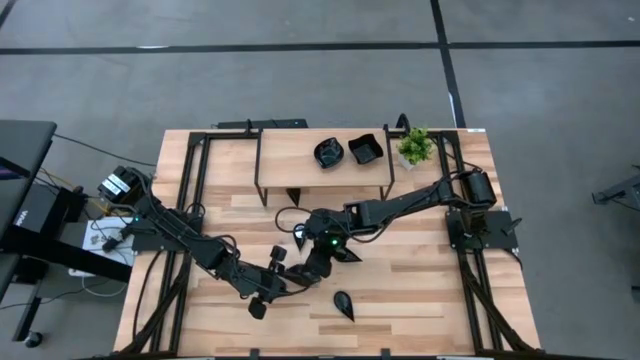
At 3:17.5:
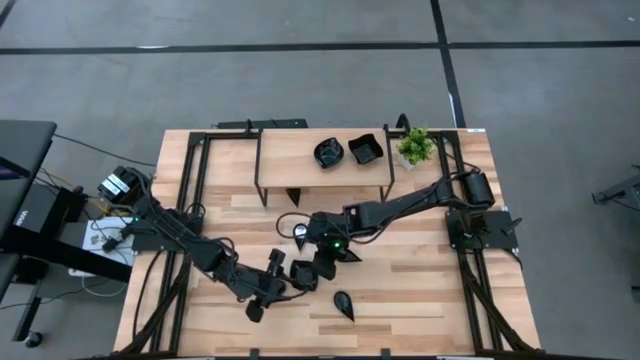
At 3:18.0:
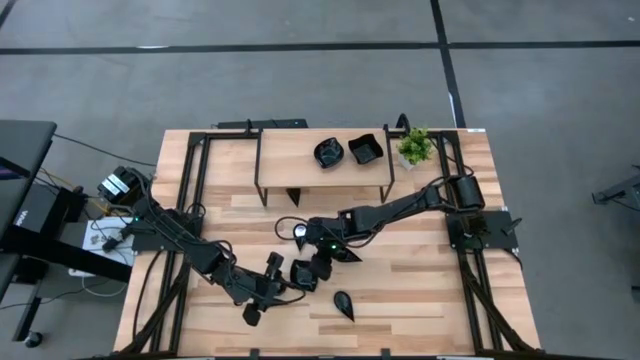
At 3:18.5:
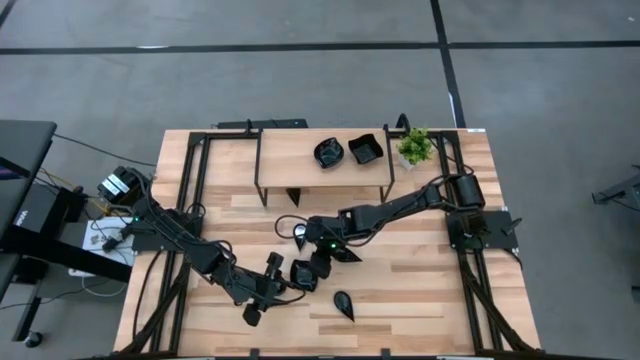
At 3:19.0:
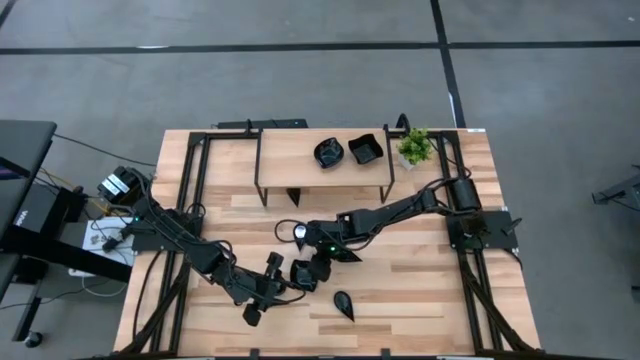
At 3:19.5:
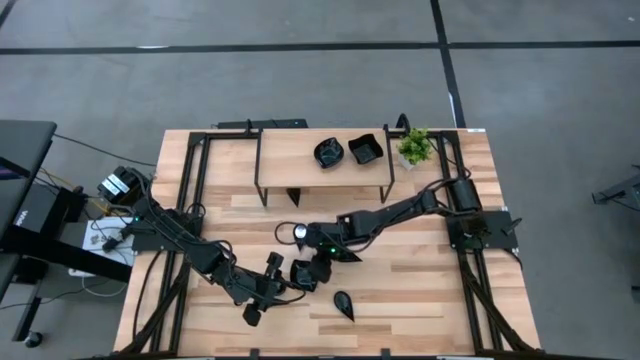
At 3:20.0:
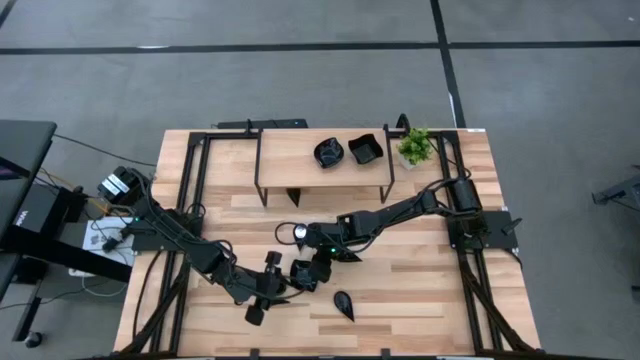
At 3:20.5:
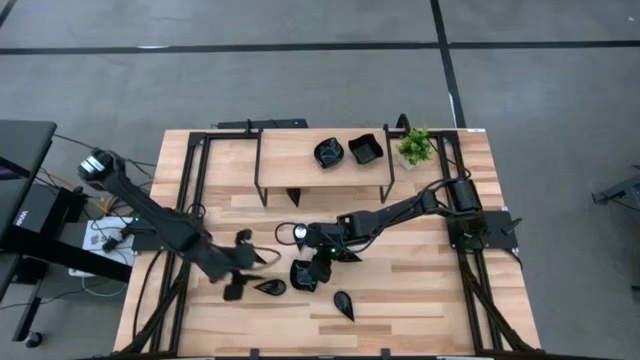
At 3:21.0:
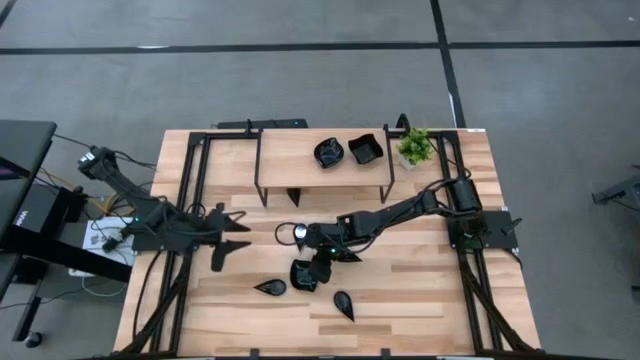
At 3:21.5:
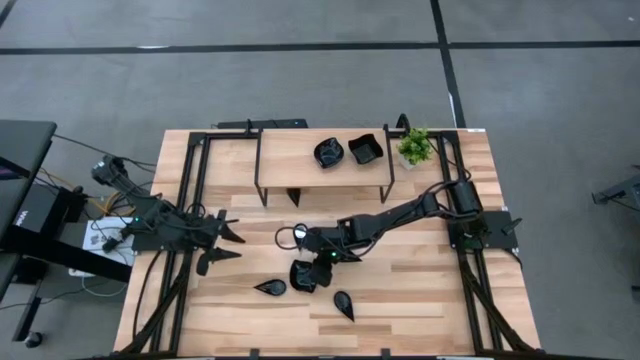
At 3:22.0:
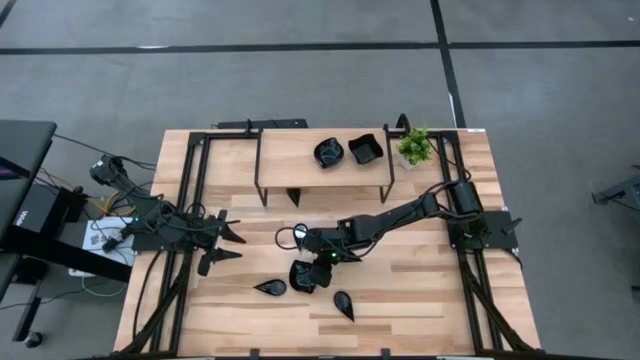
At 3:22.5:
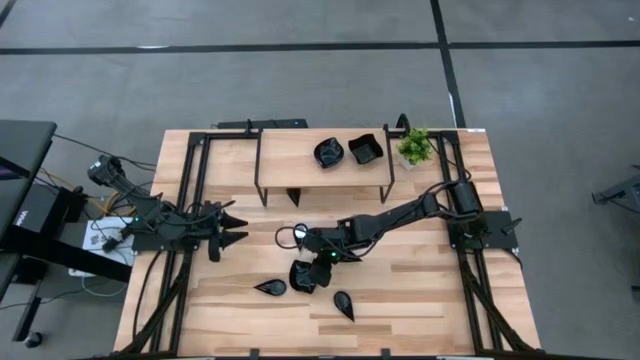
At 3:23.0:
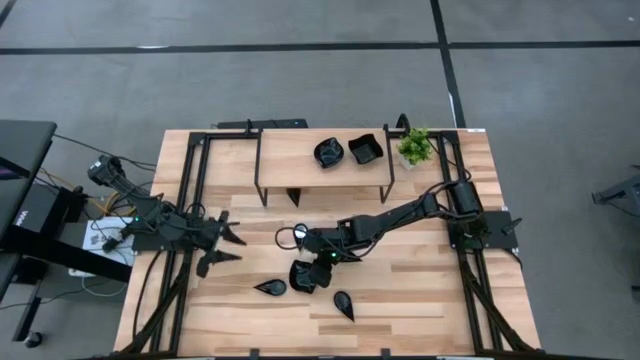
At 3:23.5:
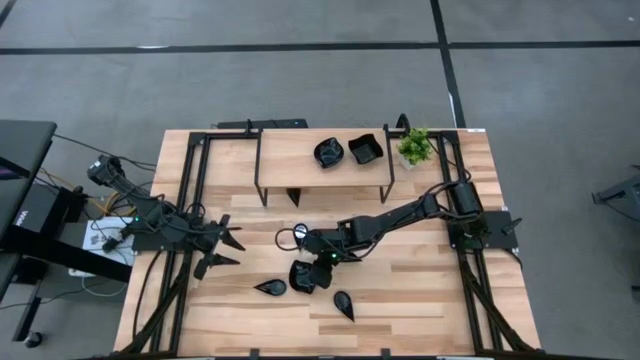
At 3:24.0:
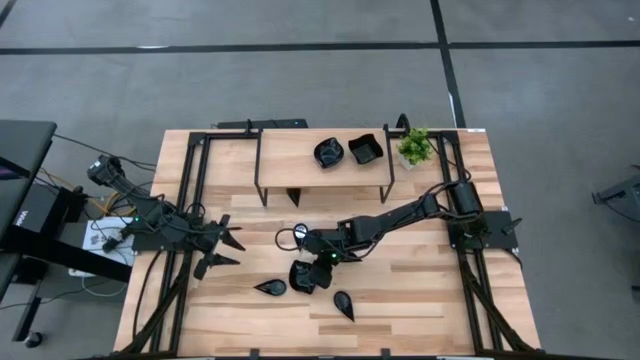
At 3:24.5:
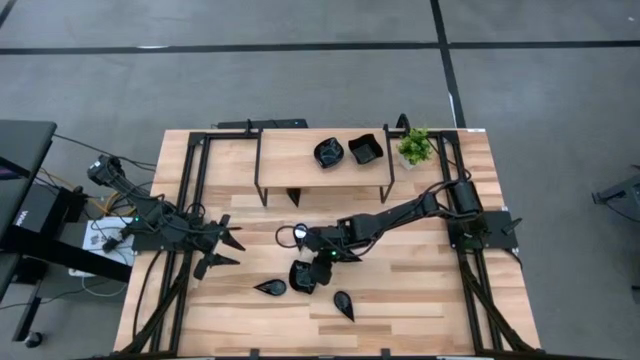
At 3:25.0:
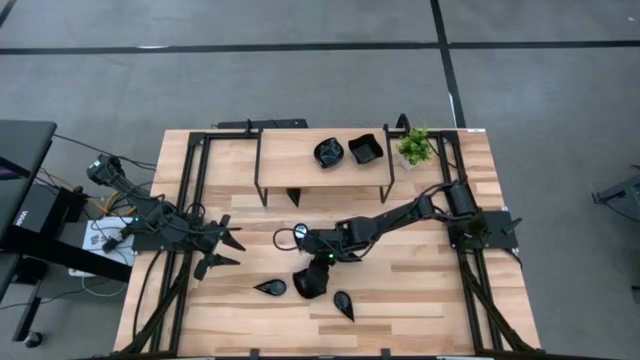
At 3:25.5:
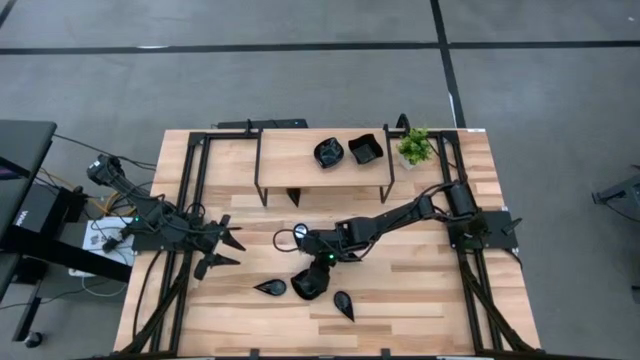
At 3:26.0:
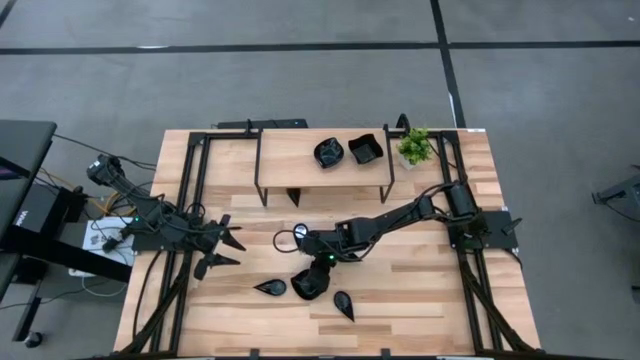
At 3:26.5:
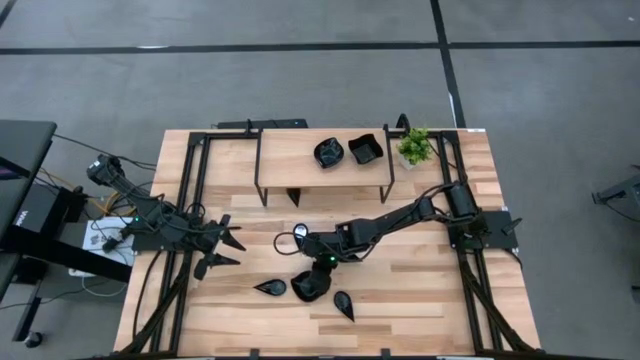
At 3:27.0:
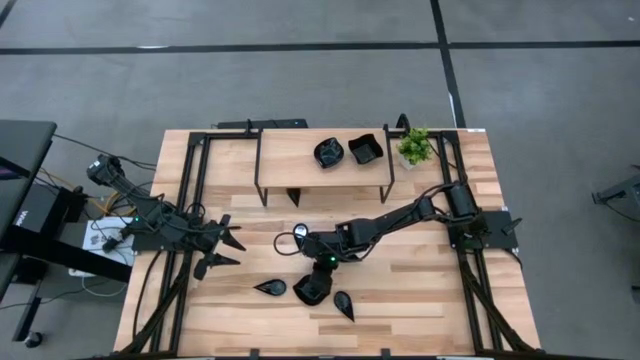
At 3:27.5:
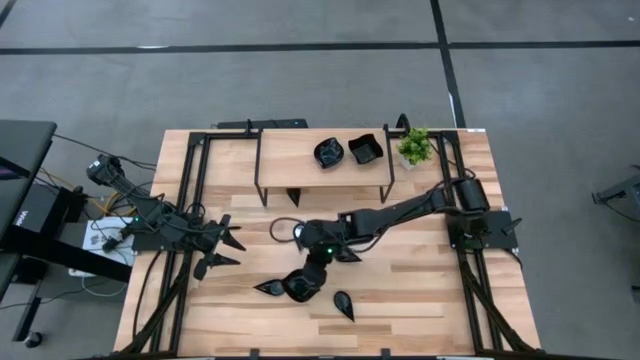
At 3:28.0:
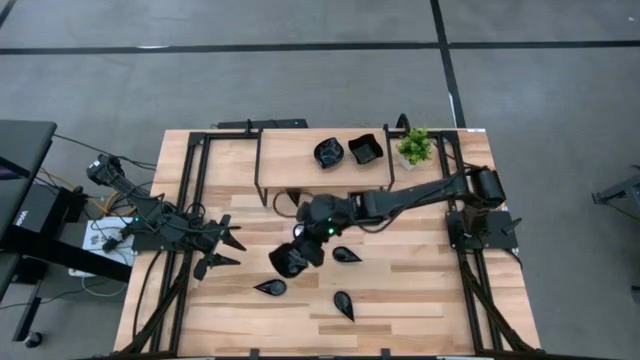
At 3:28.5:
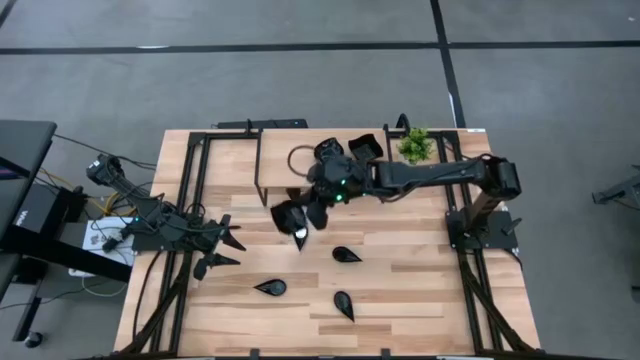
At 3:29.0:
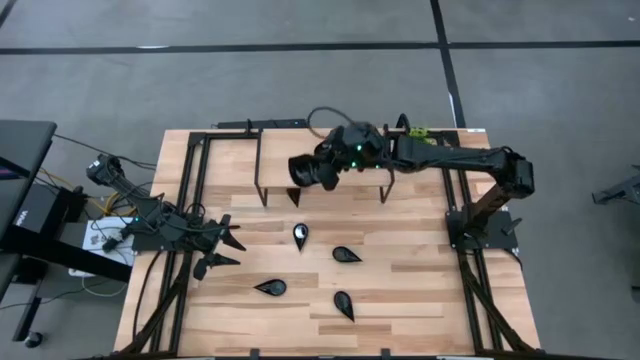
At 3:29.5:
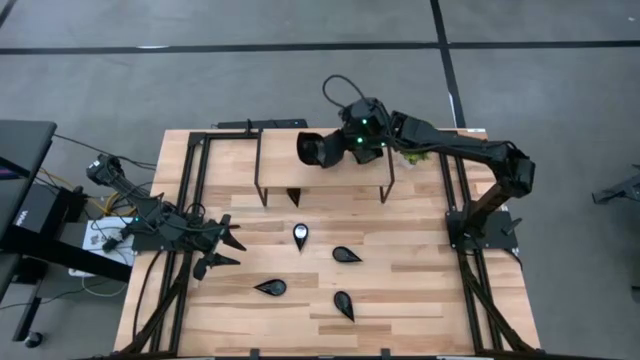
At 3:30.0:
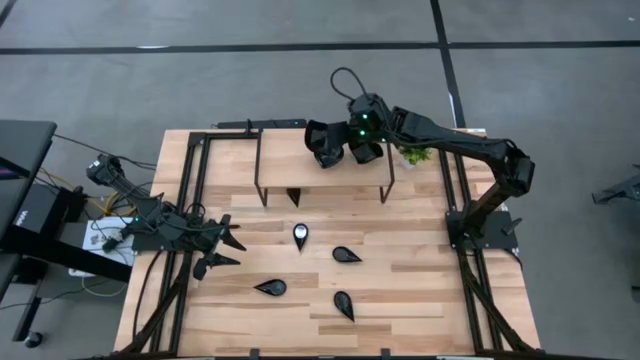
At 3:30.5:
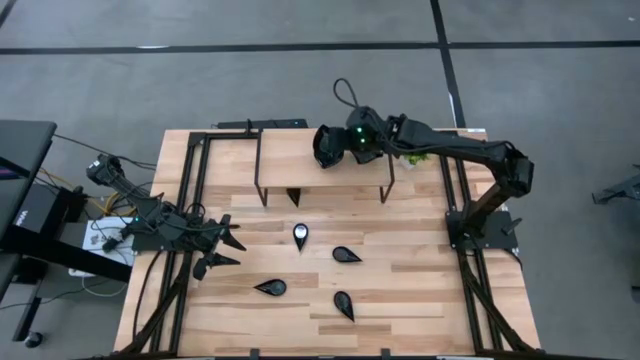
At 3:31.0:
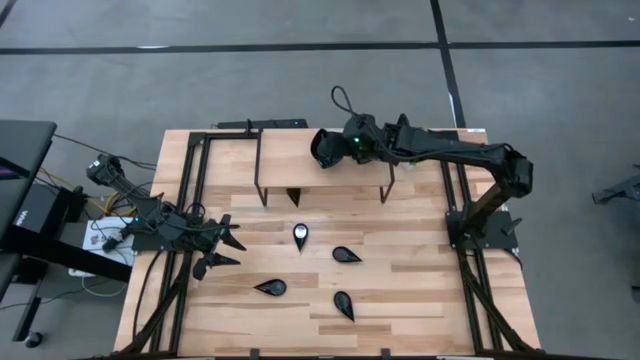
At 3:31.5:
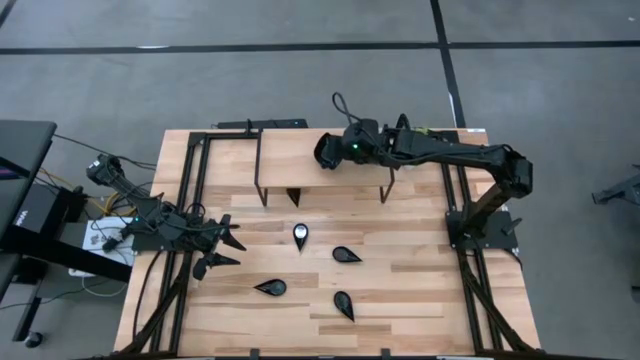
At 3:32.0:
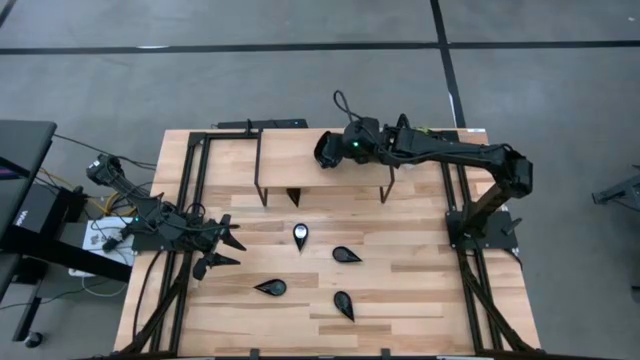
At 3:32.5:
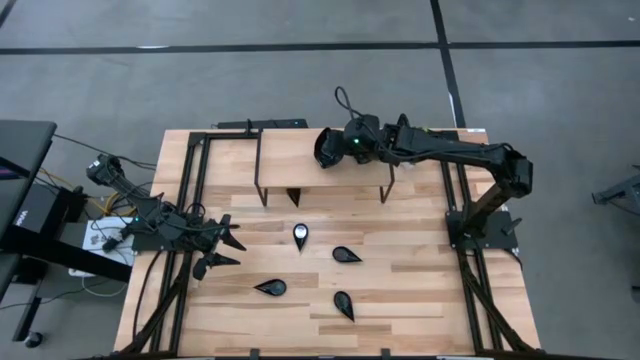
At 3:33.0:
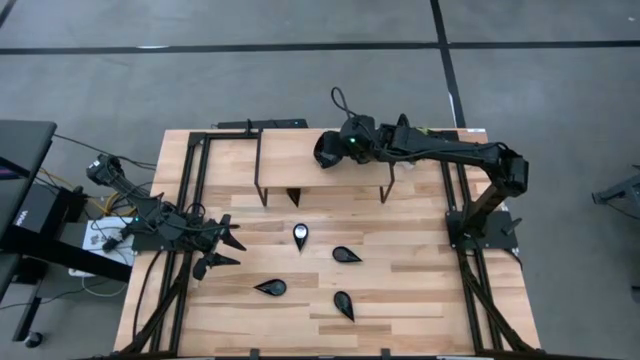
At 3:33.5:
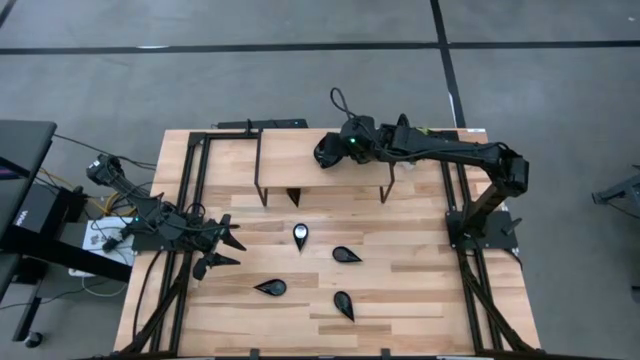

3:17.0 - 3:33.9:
Task: Pick & Place Mini shaped plates
Stack the black leaf shaped plate on the black leaf shaped plate on the shelf

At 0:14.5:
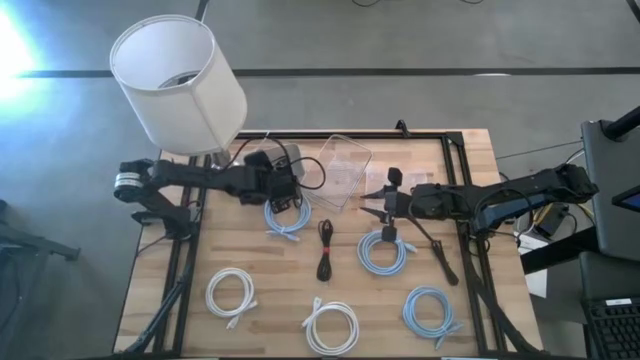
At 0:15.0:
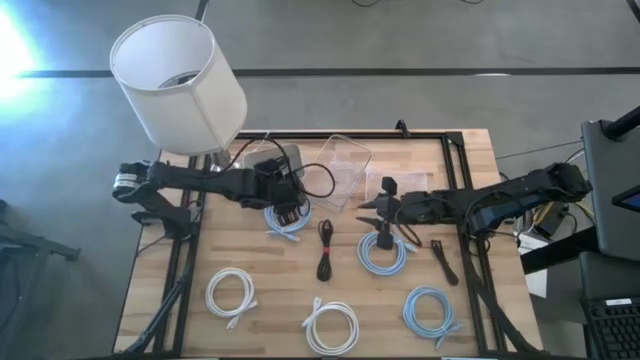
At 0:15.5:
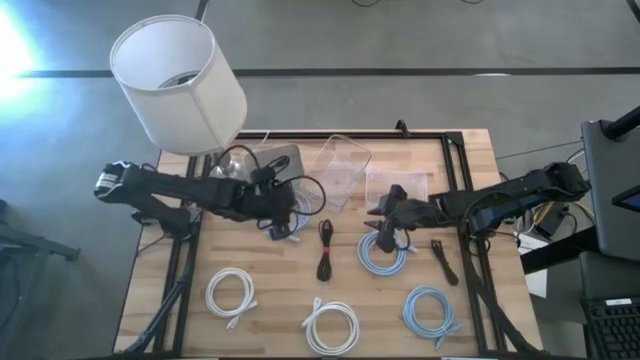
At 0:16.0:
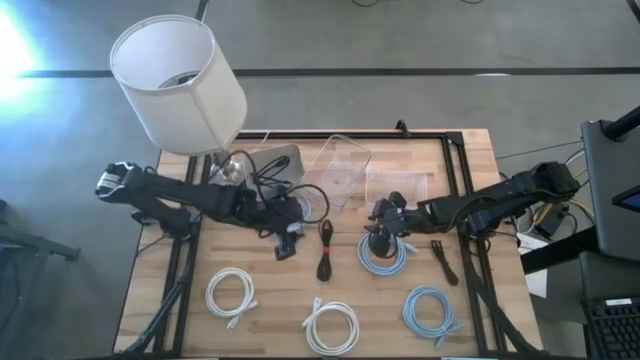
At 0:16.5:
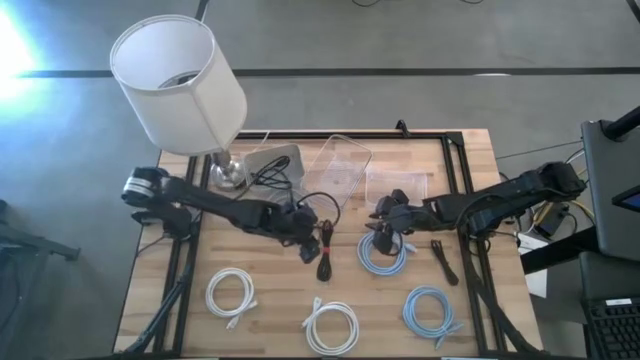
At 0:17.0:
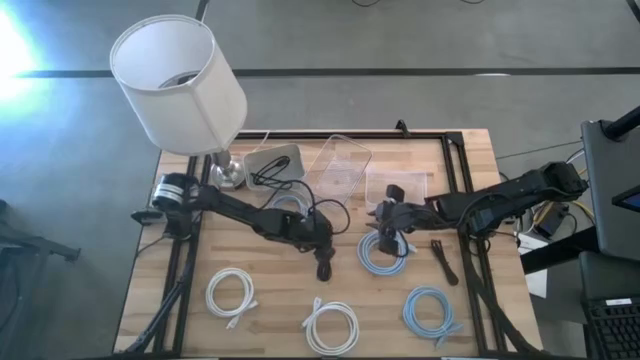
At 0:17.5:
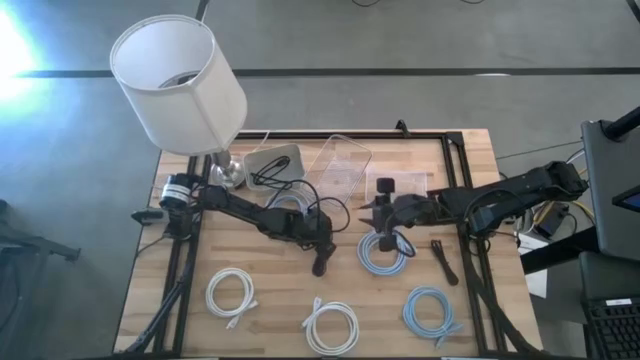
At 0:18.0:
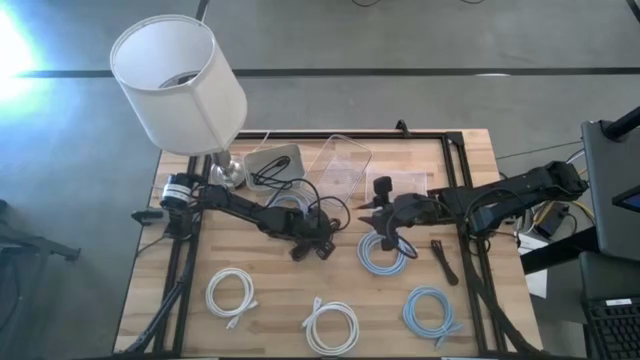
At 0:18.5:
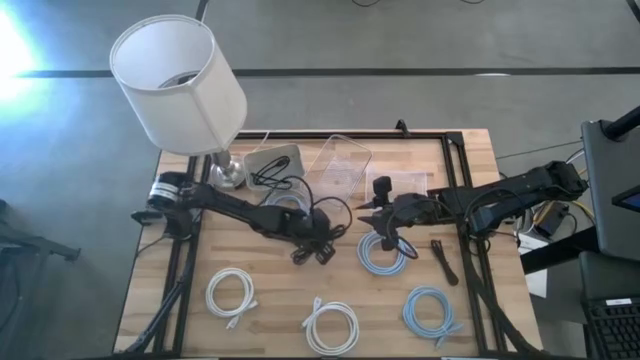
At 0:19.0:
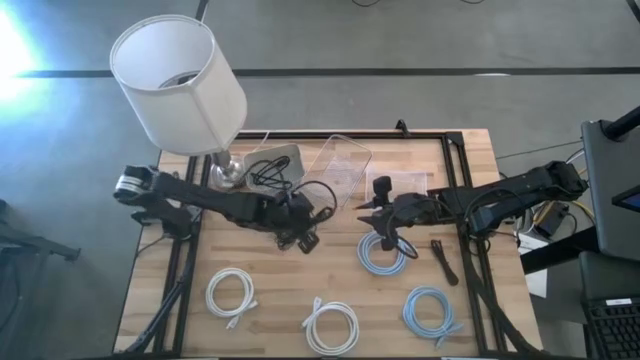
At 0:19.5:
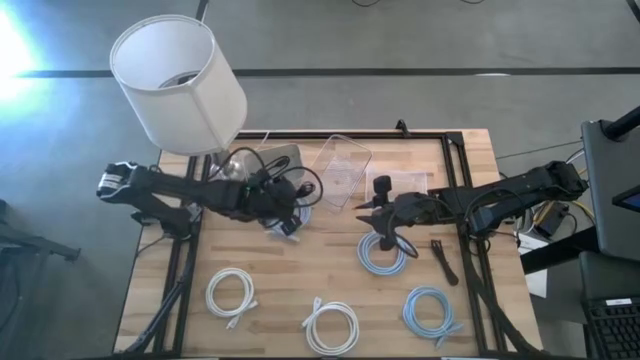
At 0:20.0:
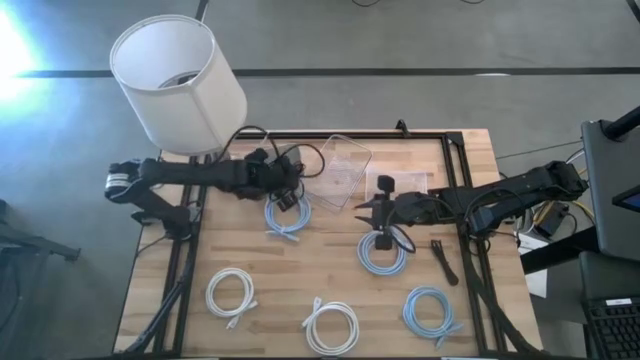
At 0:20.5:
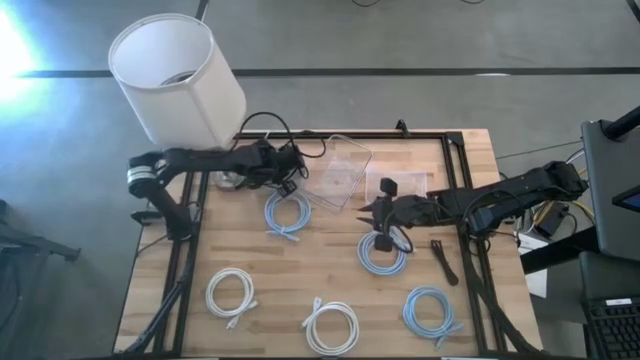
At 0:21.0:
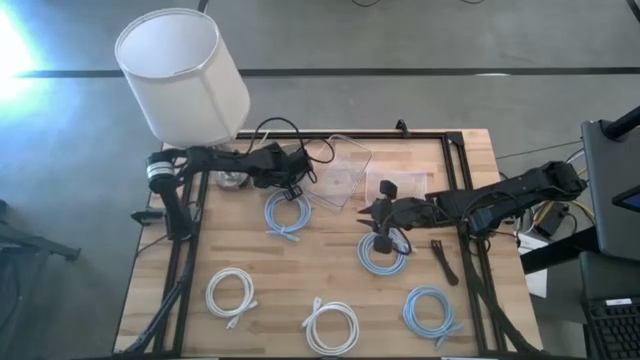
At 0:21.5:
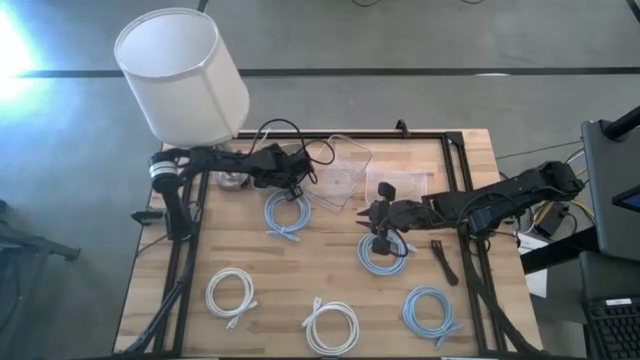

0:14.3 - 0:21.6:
Task: Pick & Place USB Port
Put the left black USB cable into the white bin
